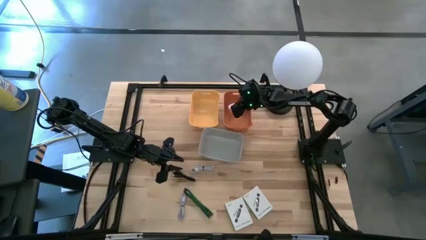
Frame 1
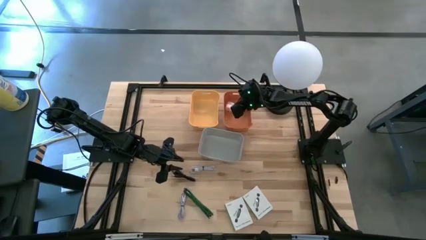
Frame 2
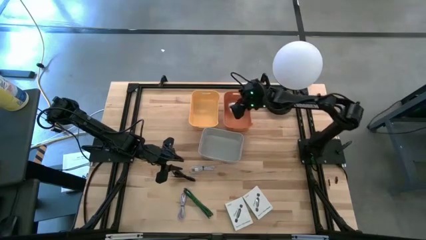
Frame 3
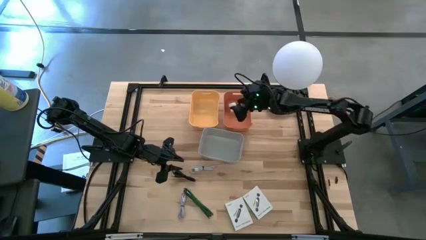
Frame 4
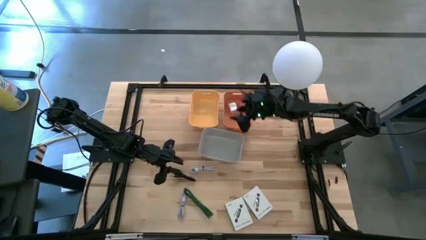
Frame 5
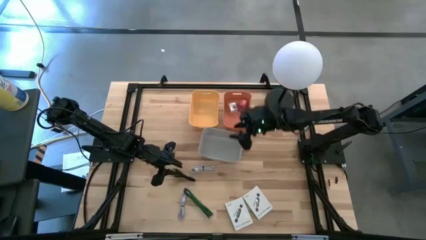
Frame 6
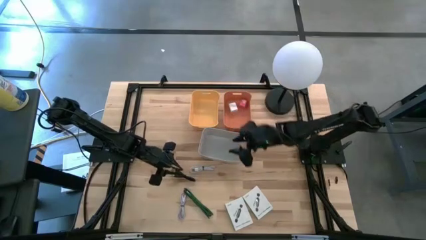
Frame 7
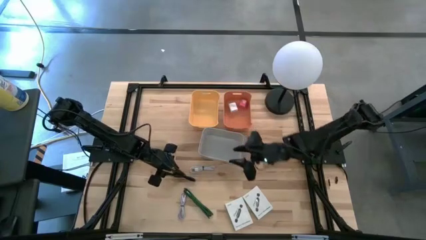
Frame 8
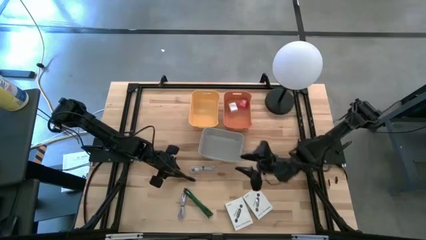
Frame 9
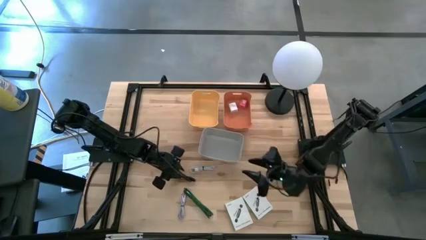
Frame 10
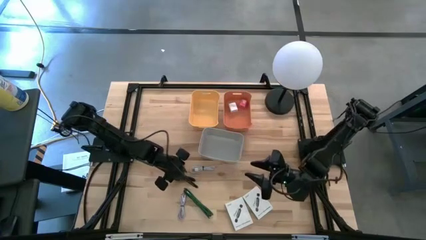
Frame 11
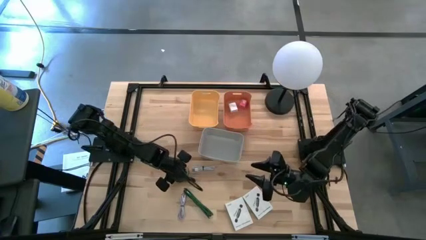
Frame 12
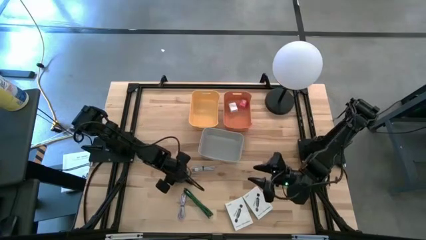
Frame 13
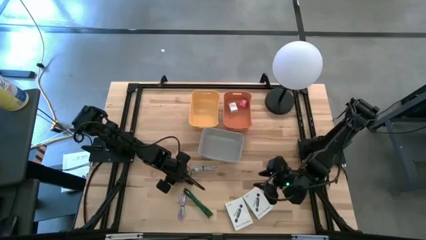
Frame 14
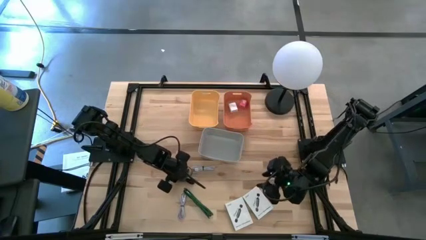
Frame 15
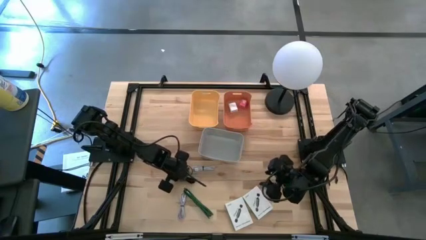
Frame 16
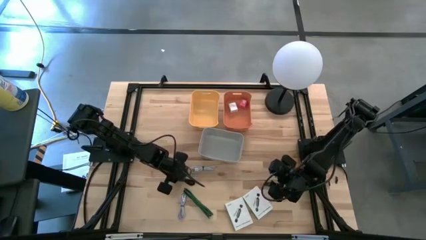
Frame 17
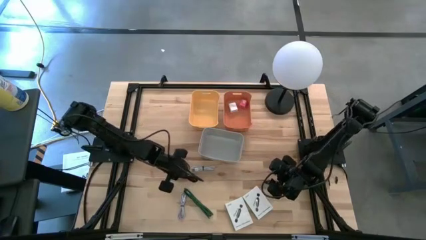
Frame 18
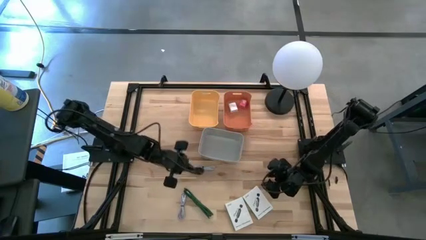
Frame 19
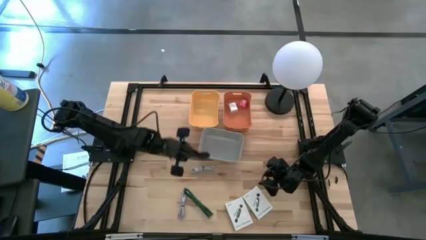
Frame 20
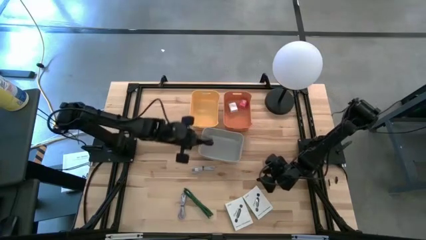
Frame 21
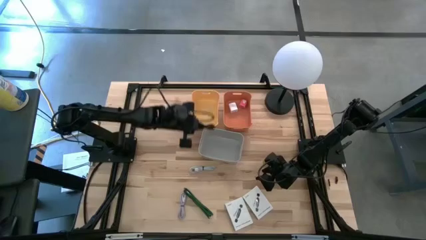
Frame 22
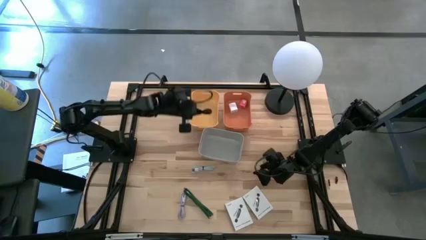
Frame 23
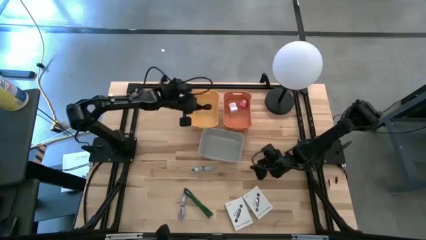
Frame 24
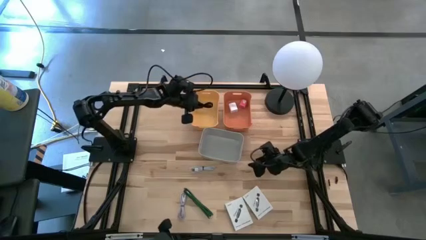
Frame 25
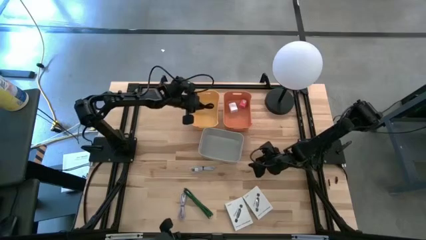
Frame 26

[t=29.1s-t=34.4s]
Task: Pick and place items into bin
Put the black charger cable into the yellow bin

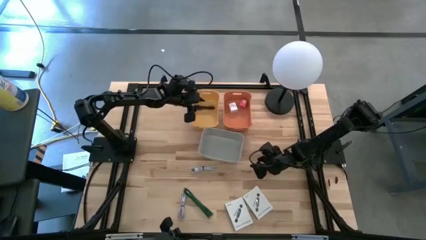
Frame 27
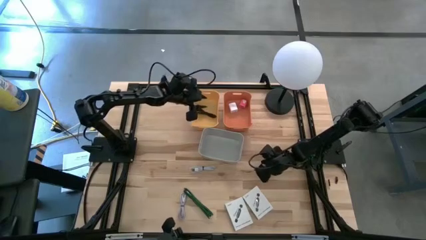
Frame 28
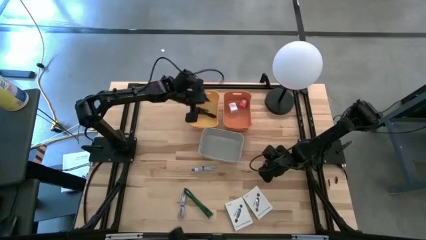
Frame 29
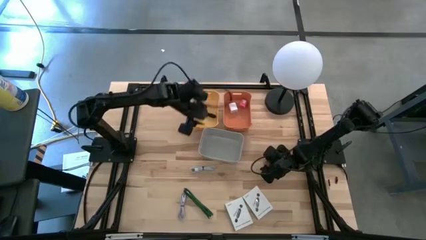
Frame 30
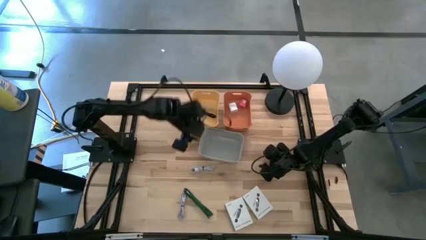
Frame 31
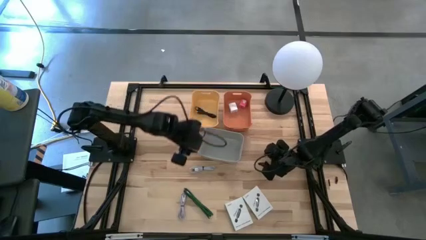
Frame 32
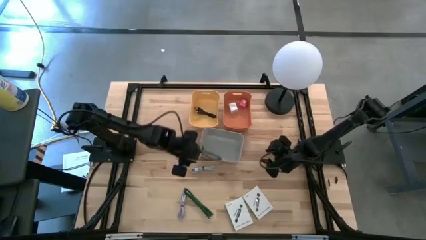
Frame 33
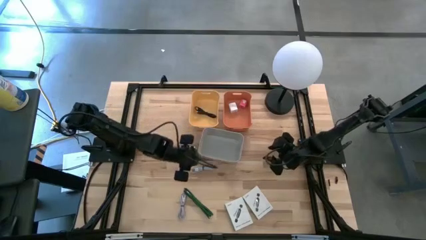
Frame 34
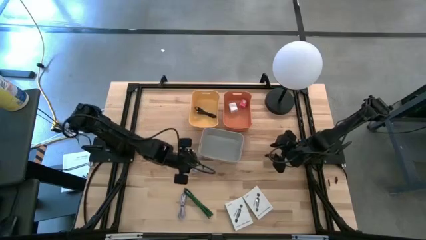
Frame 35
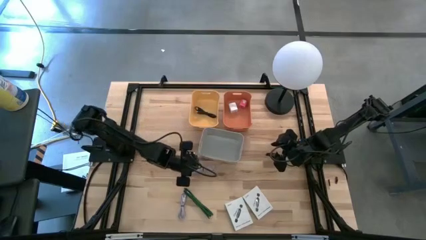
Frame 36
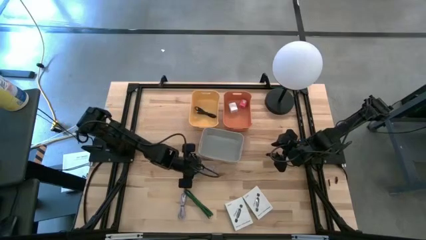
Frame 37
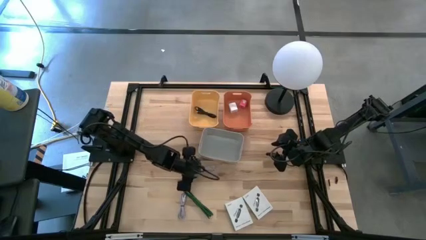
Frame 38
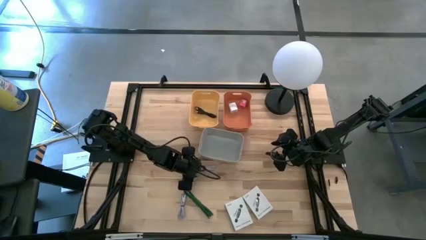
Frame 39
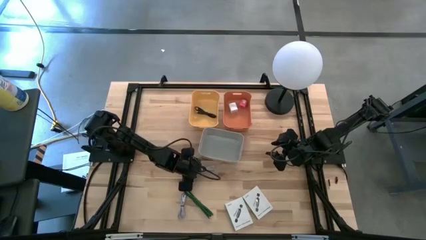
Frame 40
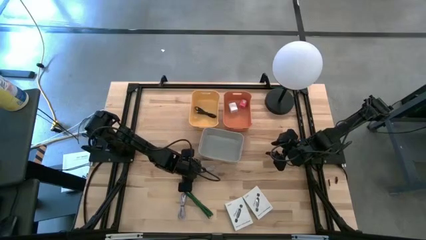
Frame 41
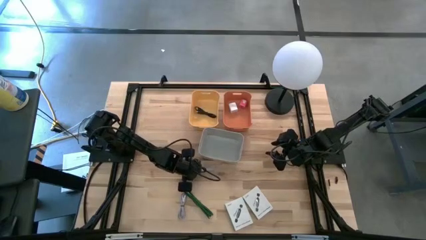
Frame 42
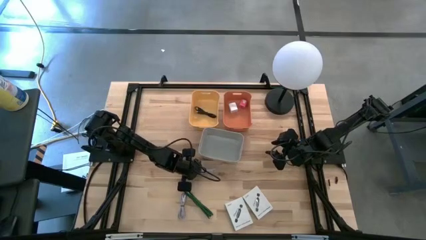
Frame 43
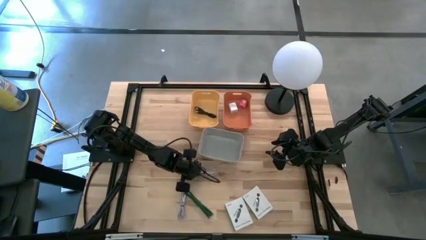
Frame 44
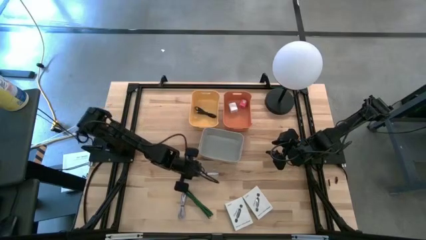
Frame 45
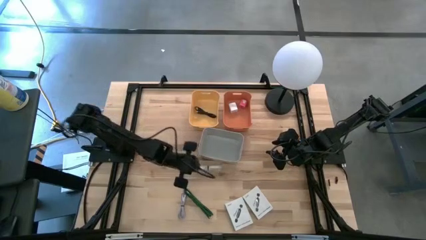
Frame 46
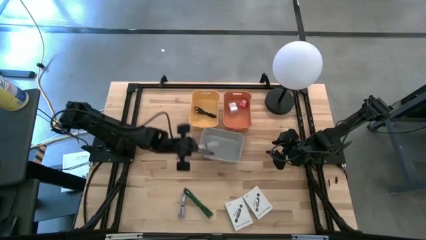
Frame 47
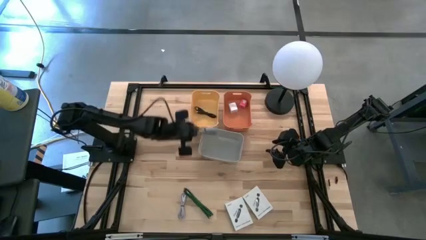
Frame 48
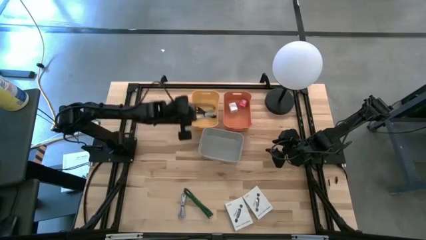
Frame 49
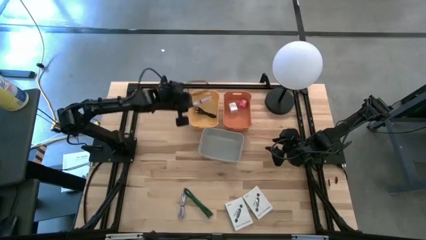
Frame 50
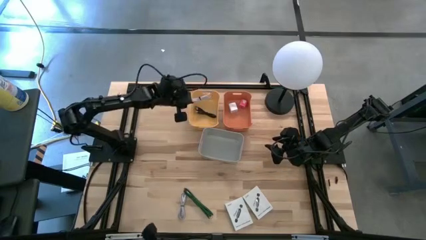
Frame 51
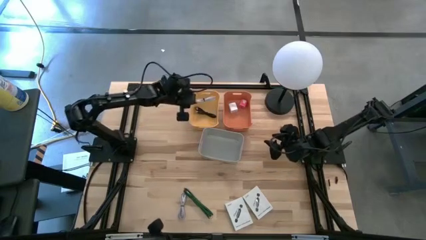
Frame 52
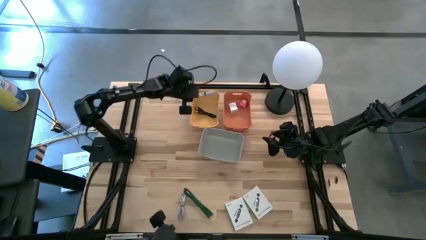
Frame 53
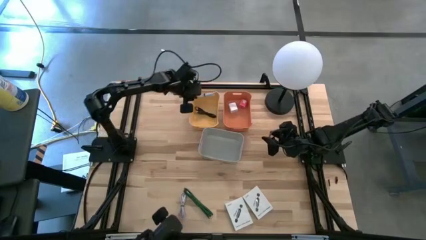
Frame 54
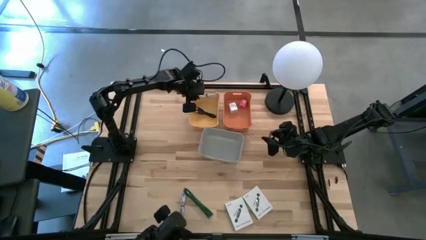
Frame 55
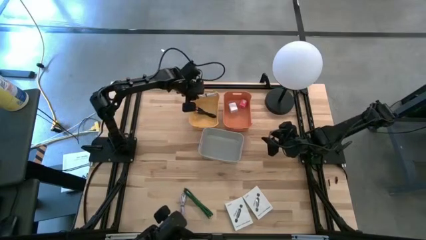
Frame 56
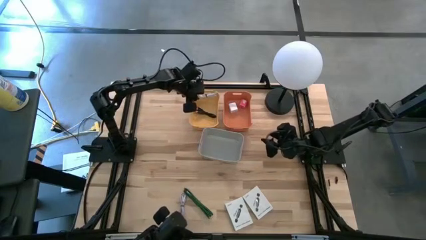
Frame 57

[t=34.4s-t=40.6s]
Put the white charger cable into the yellow bin

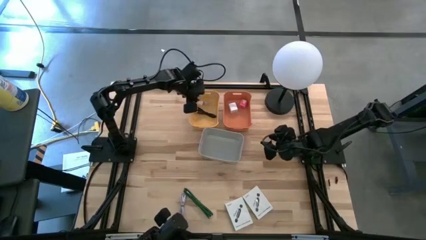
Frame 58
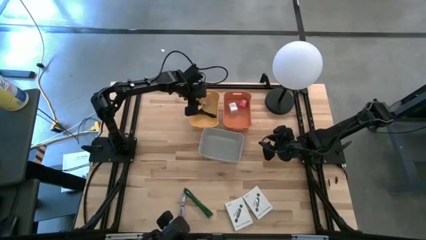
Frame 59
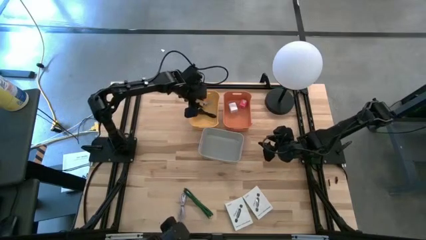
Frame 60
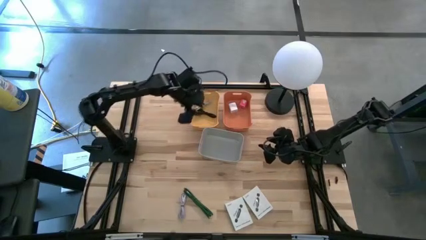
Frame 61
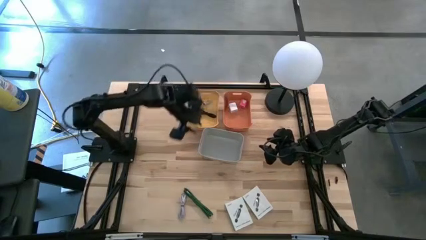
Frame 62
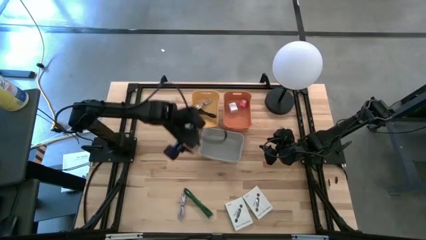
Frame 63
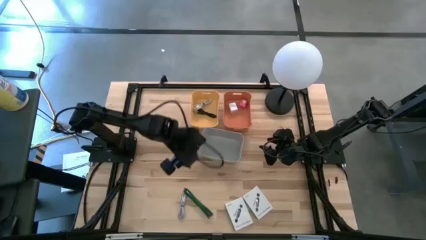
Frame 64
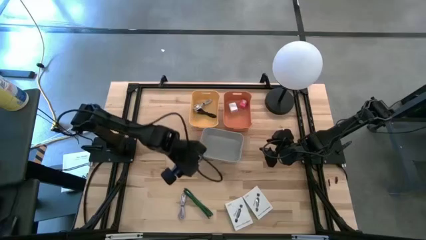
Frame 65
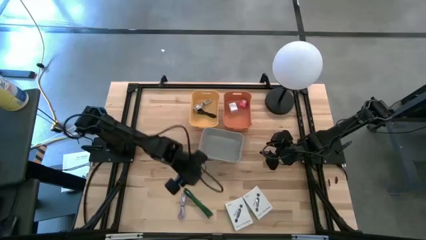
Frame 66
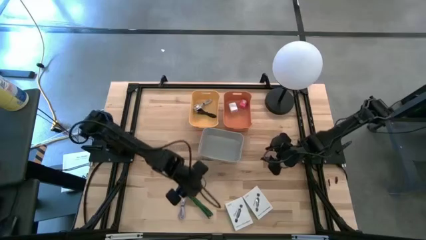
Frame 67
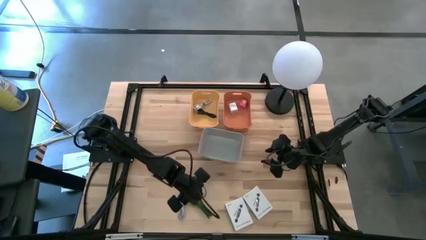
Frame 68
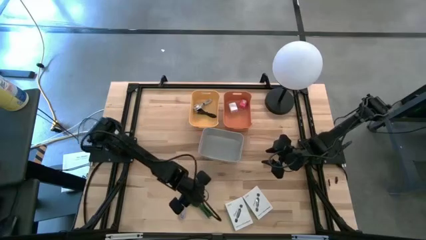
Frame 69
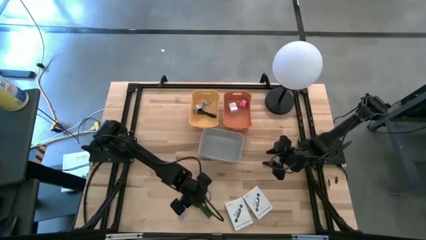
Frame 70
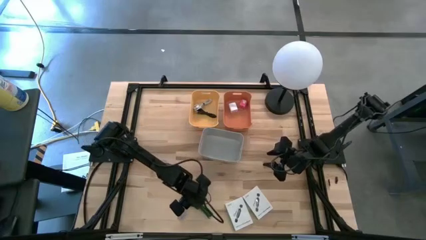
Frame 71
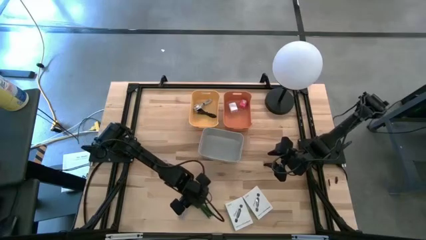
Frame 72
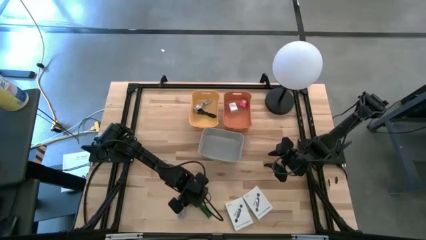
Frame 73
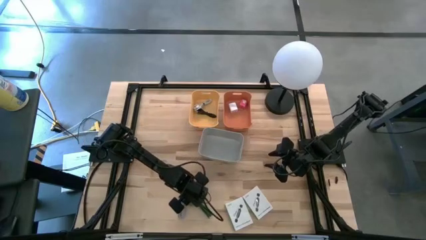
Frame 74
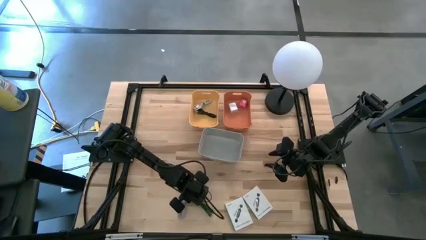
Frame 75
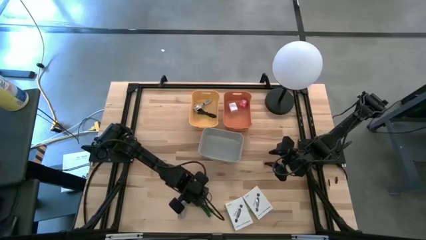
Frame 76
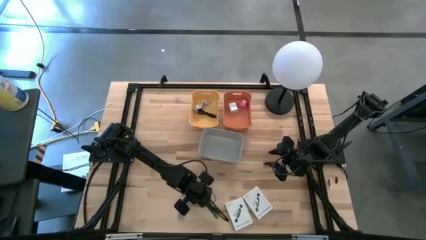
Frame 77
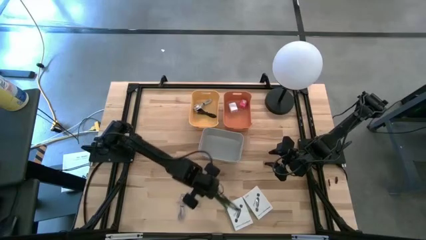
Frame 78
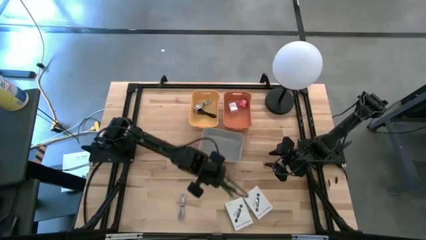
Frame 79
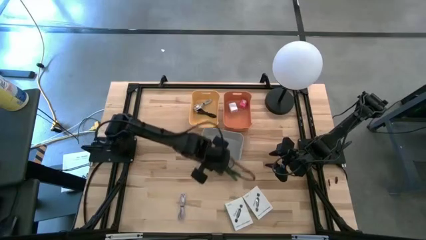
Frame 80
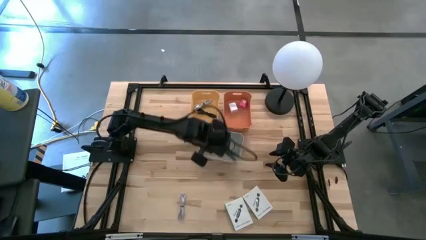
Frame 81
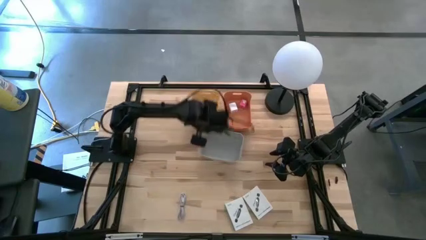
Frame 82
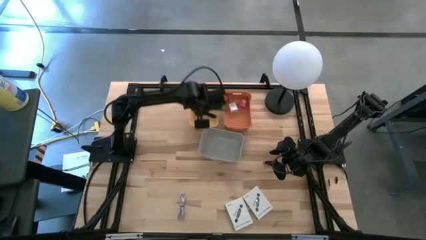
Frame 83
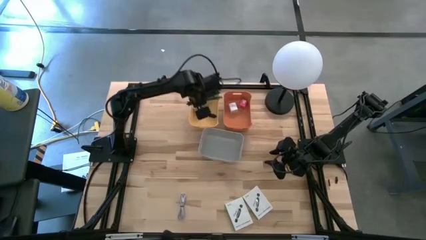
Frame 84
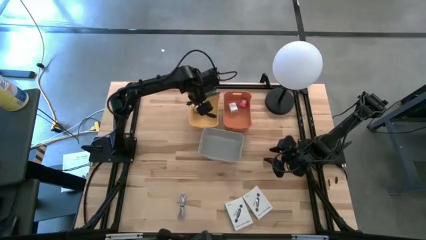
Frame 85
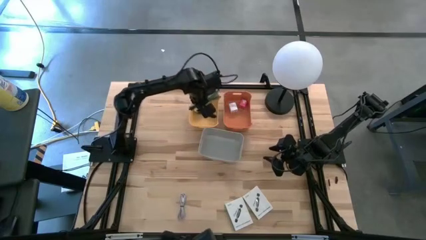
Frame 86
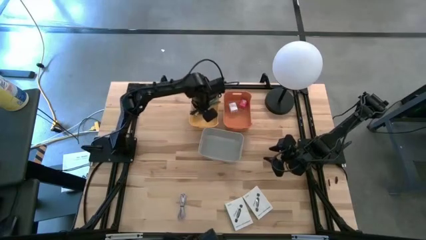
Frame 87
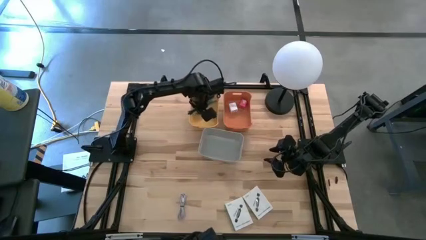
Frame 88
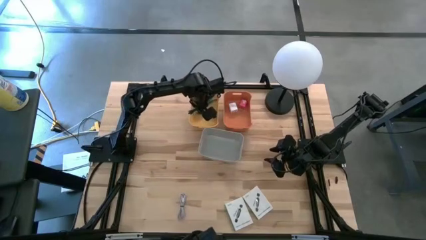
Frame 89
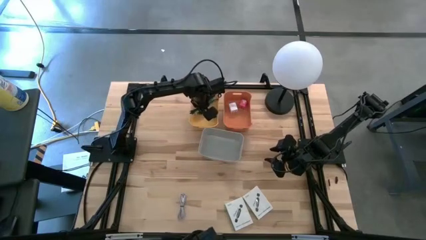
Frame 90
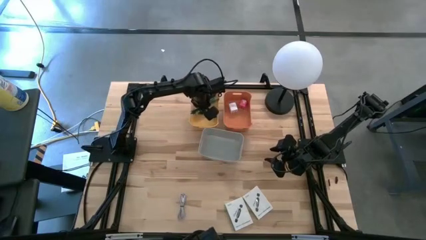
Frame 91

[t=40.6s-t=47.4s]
Put the green charger cable into the yellow bin
